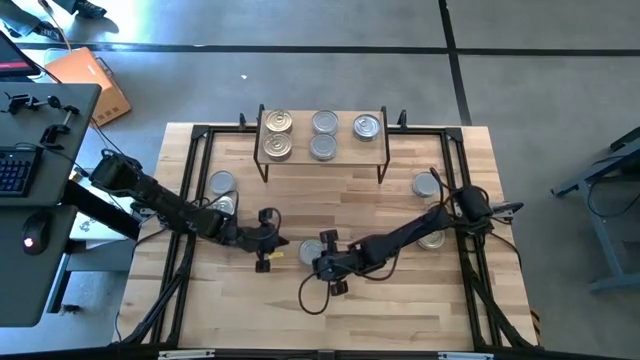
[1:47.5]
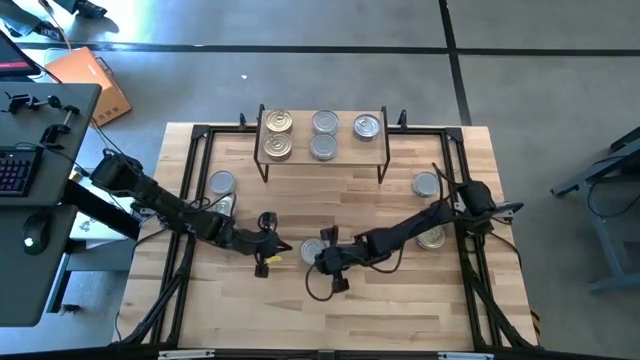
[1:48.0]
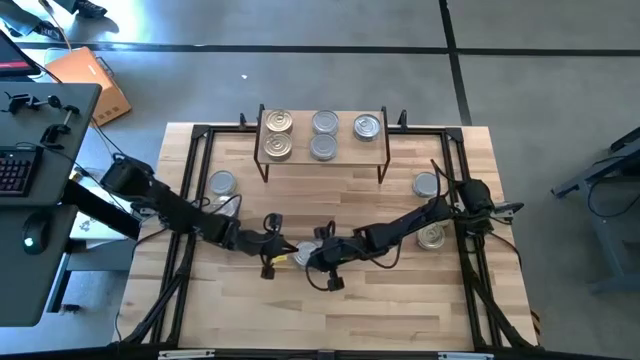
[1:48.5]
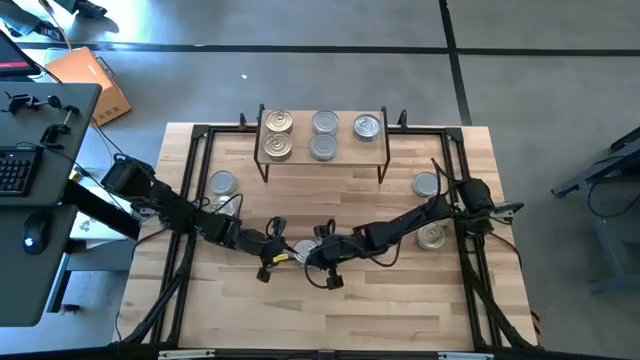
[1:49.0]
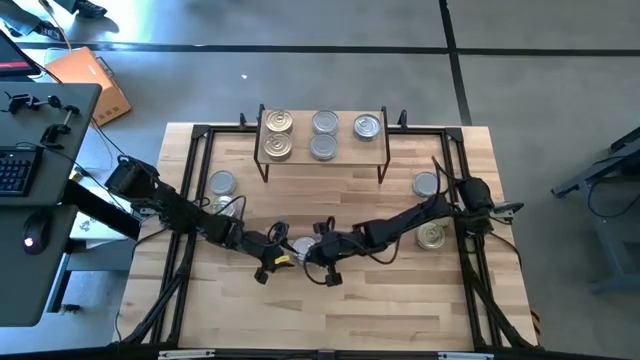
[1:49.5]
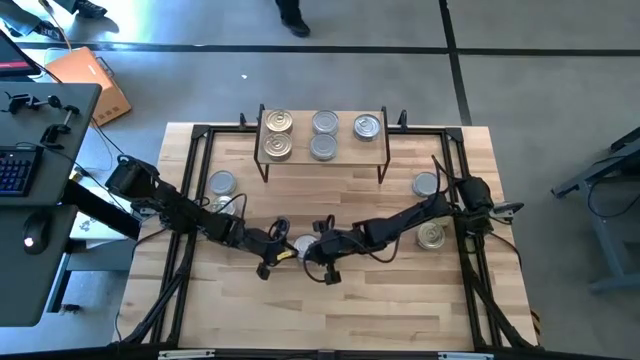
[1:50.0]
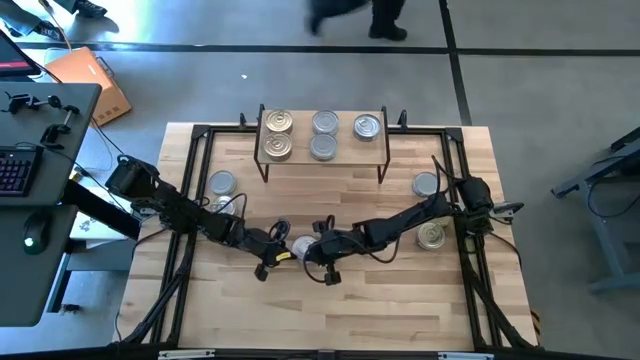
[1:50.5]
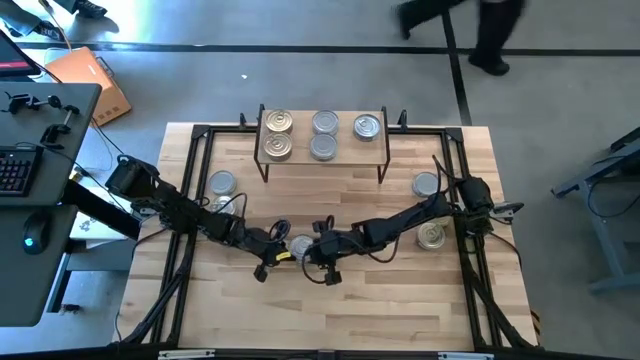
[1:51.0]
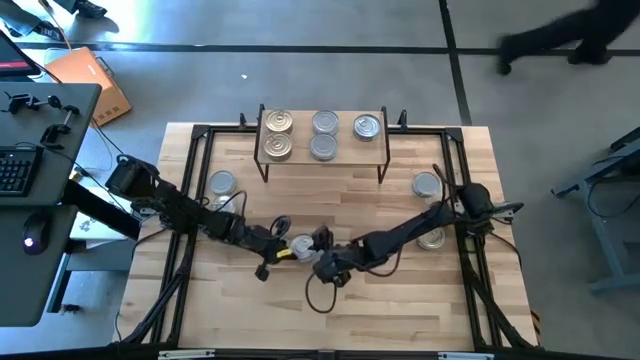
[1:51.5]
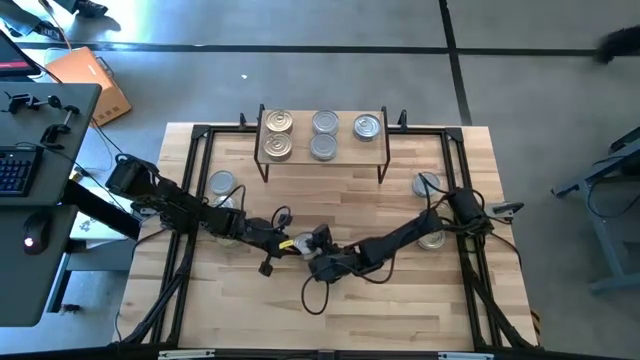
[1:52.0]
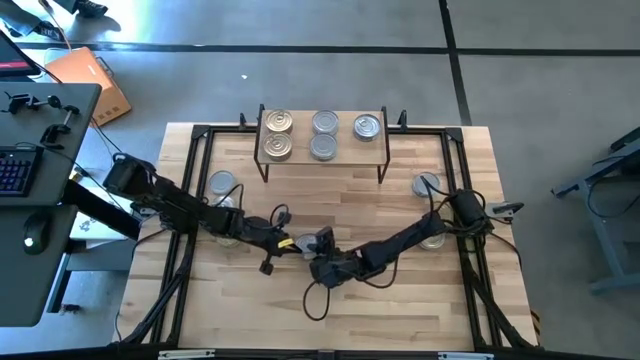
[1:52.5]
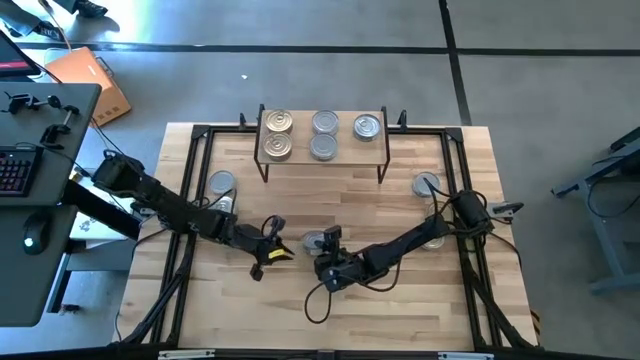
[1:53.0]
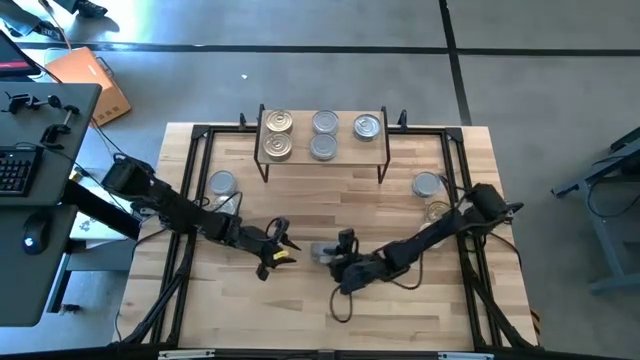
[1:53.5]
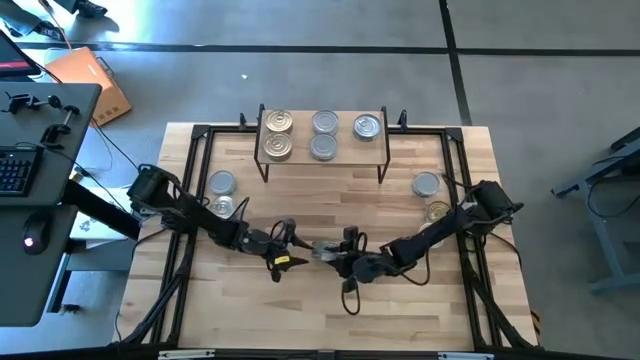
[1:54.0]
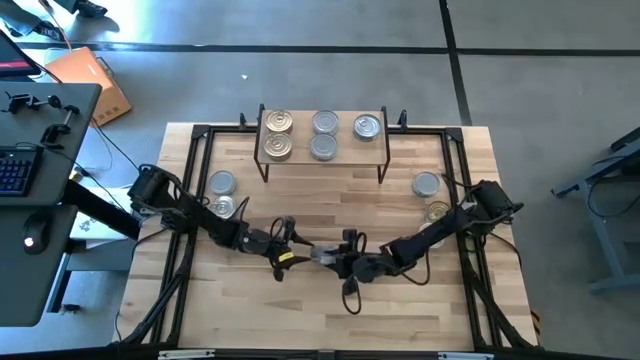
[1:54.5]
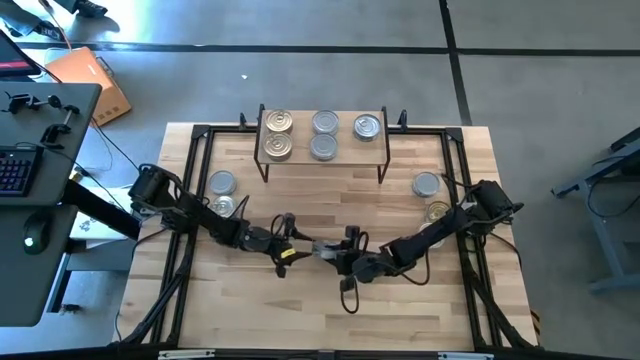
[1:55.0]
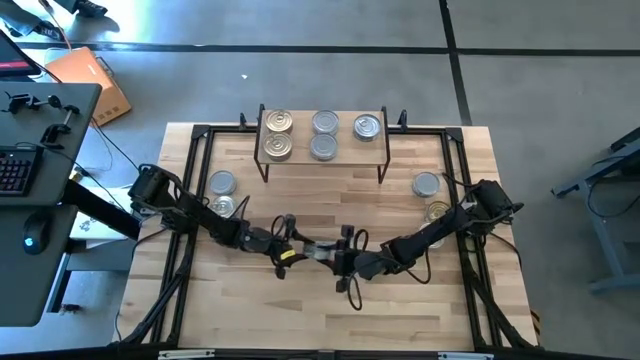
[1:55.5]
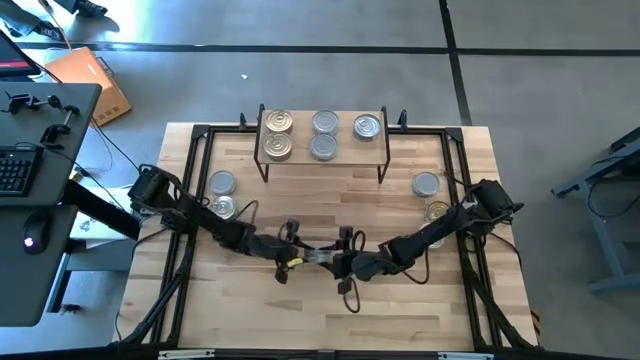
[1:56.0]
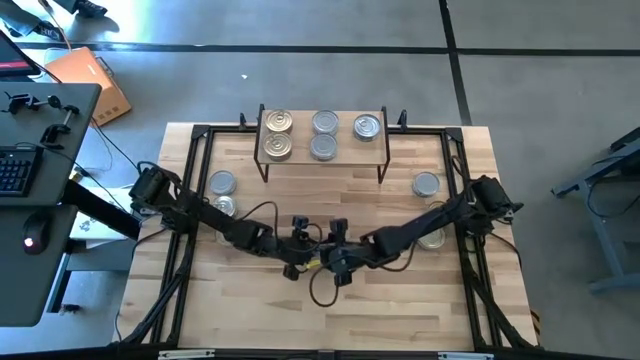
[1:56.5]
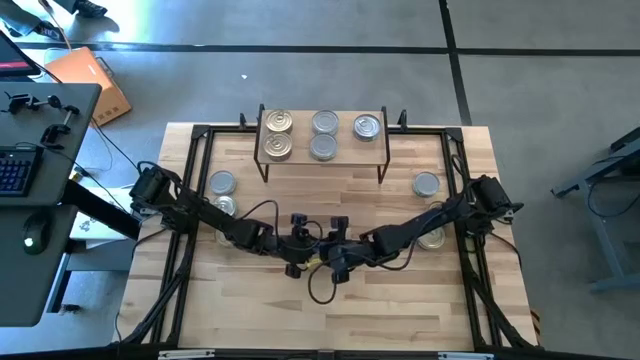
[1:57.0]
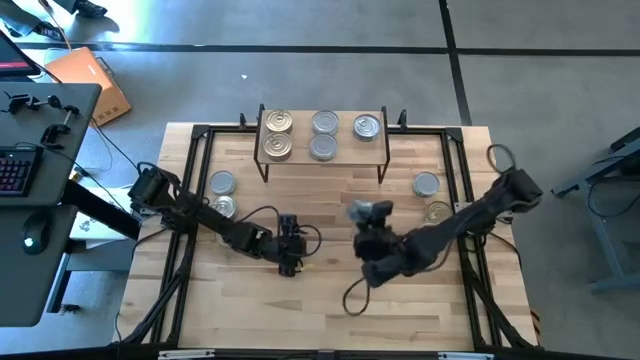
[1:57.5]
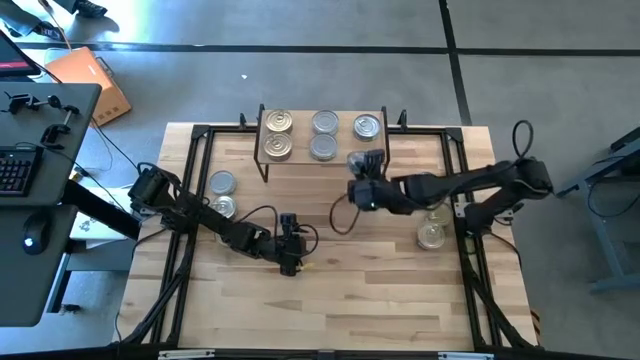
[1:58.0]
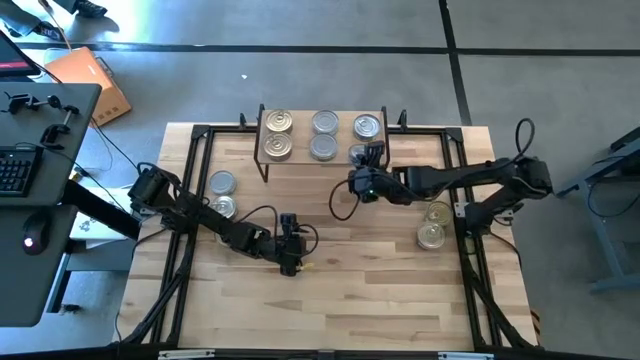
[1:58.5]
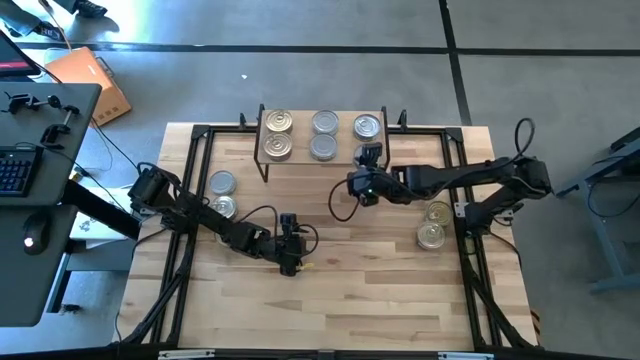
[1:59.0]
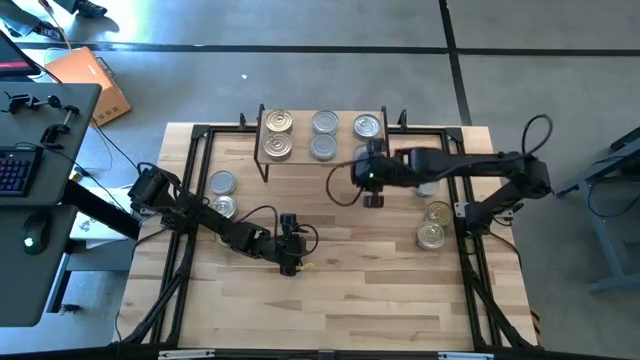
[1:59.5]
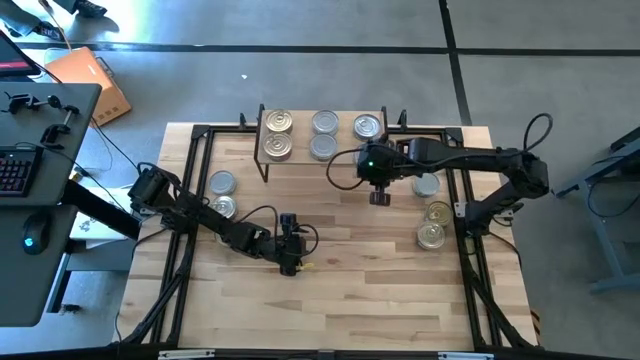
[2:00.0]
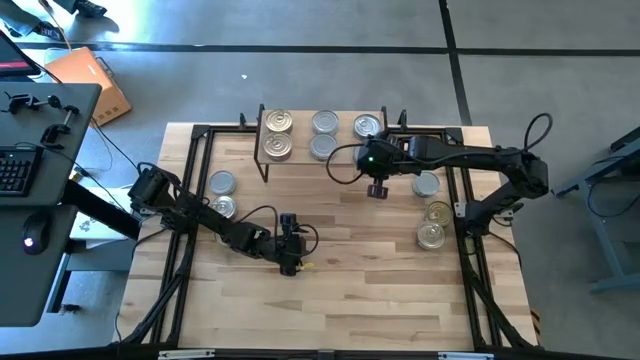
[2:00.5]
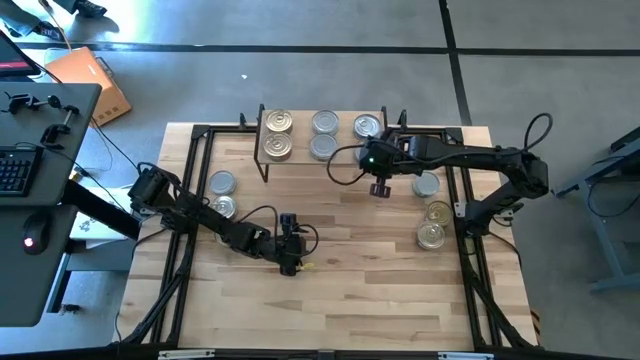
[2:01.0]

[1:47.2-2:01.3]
Task: Stack canned seafood by type on shelf
Put the bottom left green tuna can on the shelf aligned with the other green tuna can

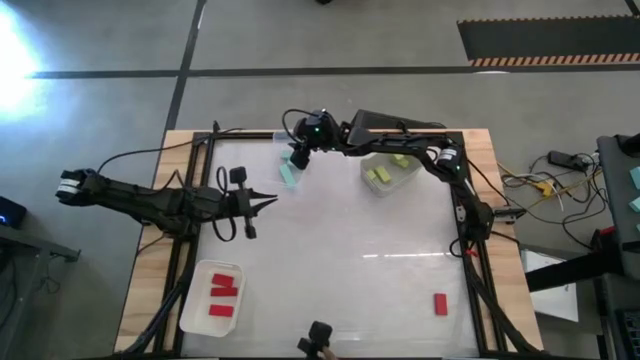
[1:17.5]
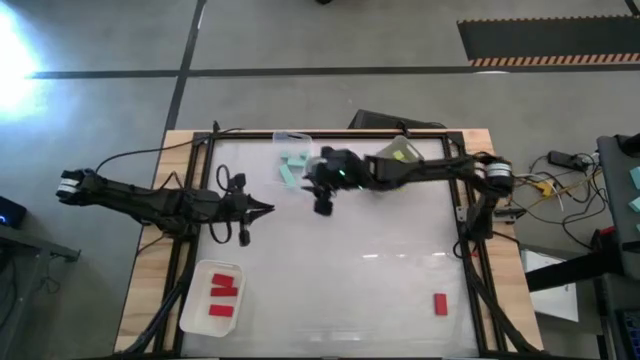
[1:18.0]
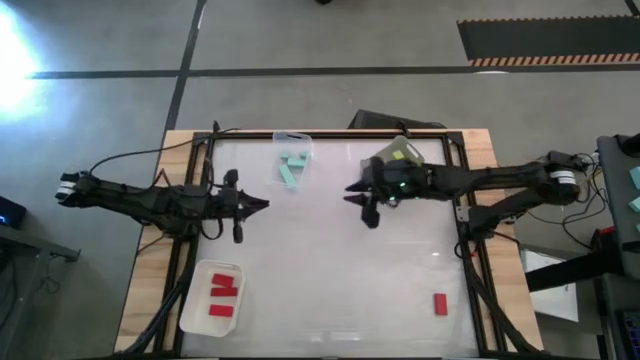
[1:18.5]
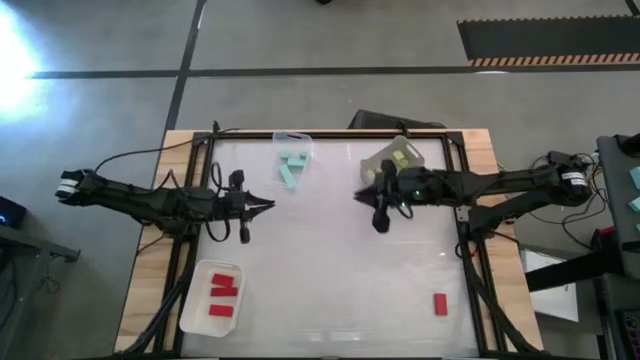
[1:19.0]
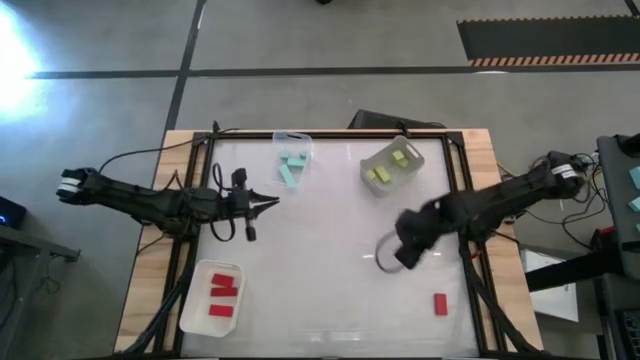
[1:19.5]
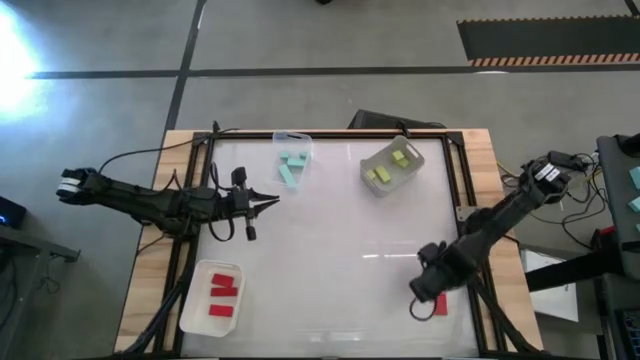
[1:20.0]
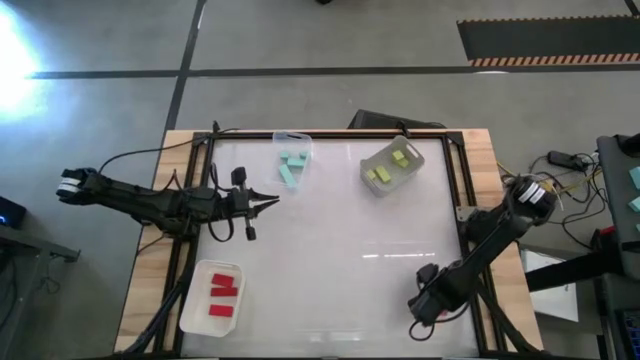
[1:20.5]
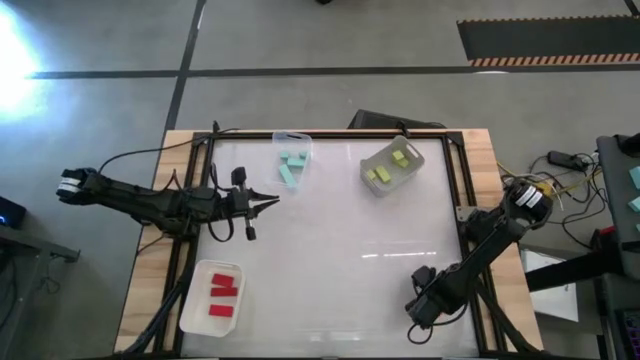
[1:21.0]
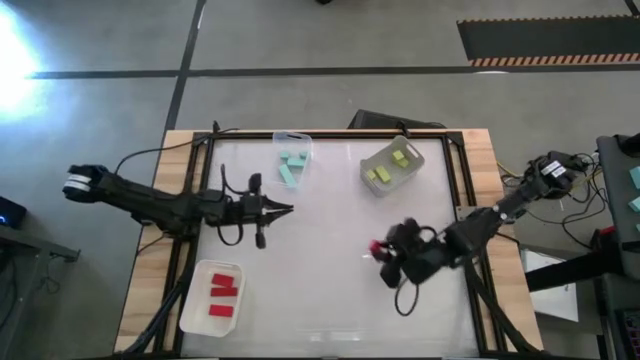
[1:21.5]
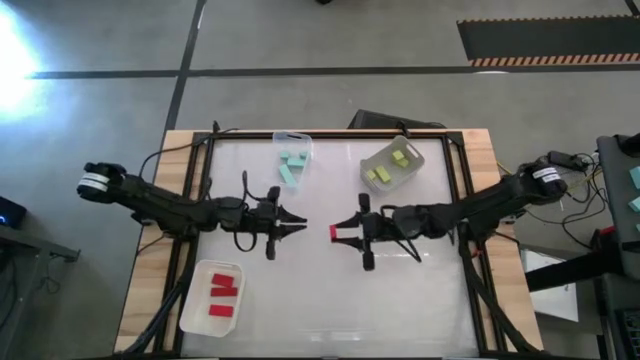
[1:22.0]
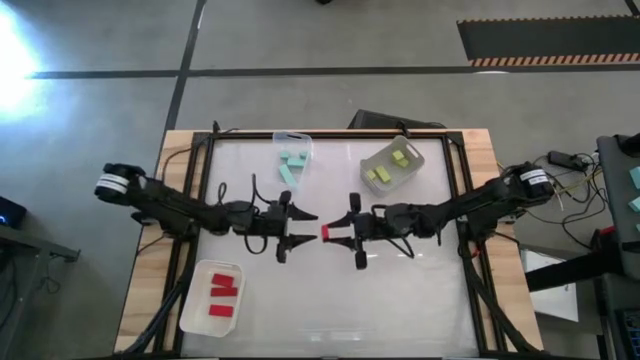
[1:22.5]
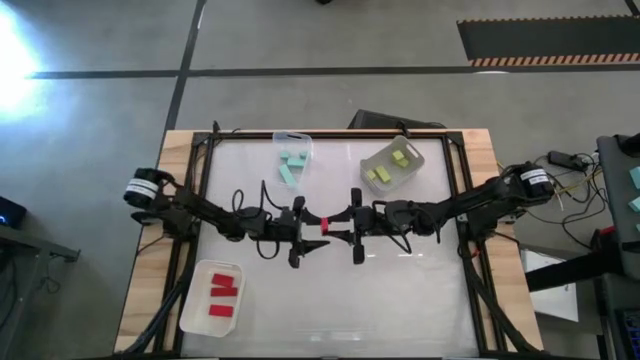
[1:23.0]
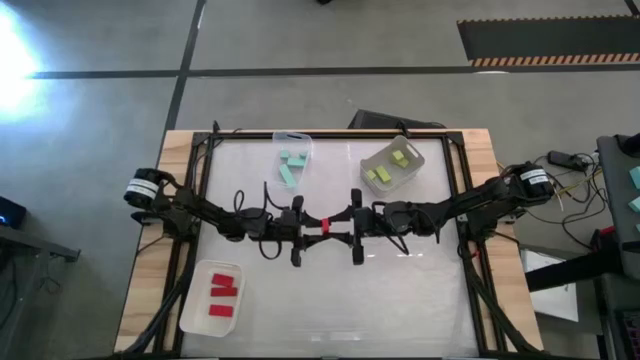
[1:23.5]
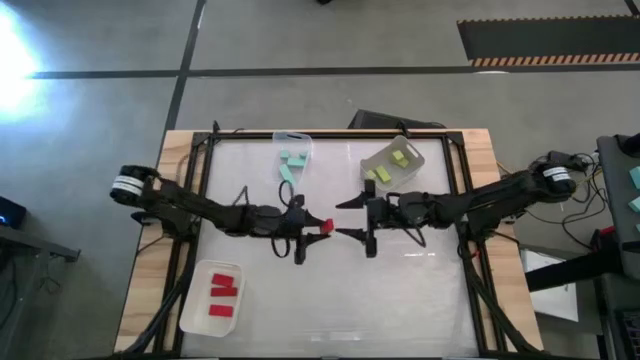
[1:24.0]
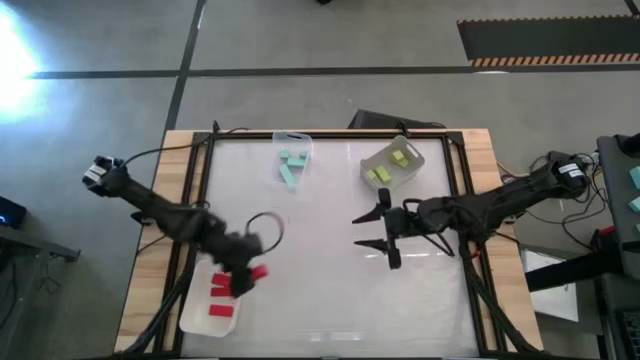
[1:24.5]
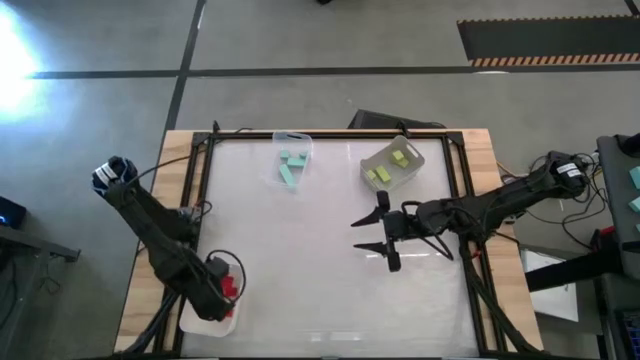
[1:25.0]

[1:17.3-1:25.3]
Task: Sort & place blocks by color
Put the red block into the white bin
